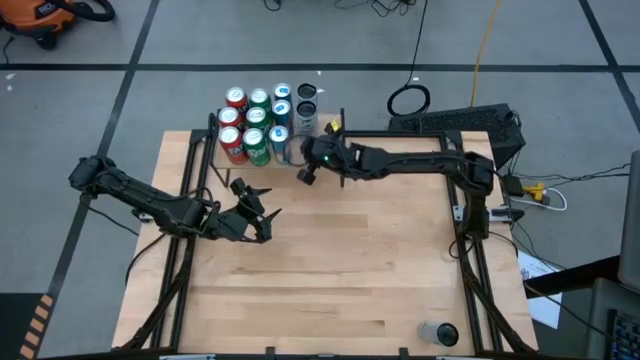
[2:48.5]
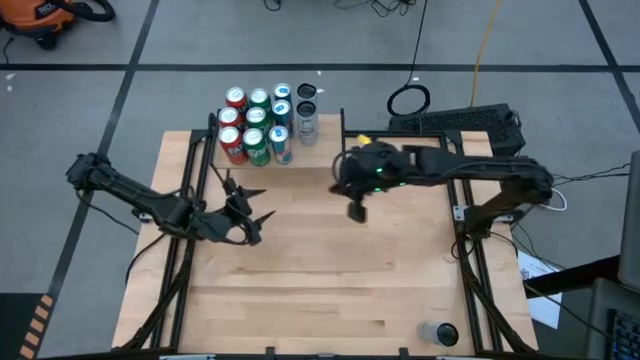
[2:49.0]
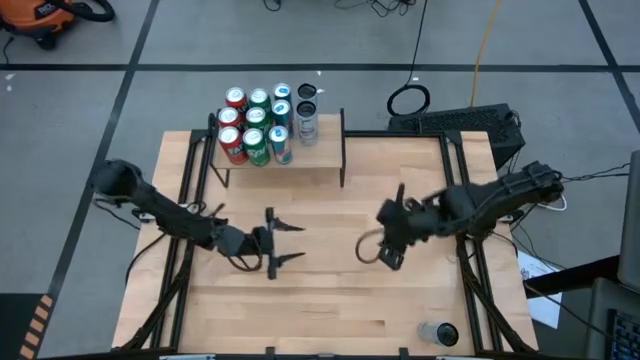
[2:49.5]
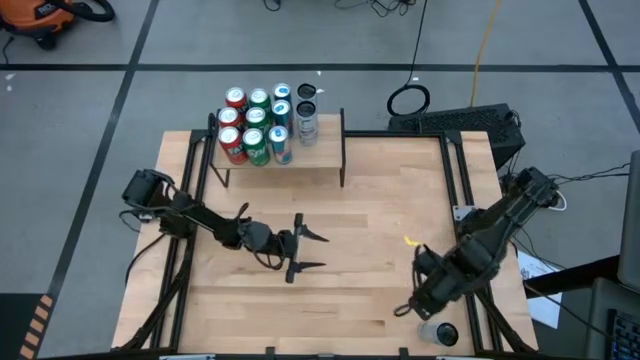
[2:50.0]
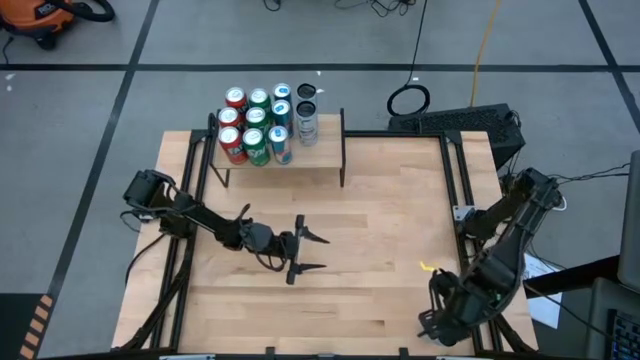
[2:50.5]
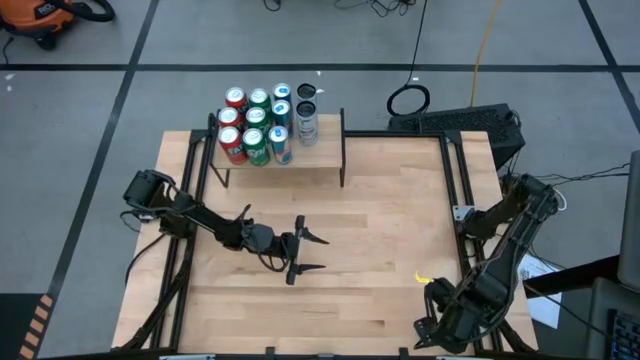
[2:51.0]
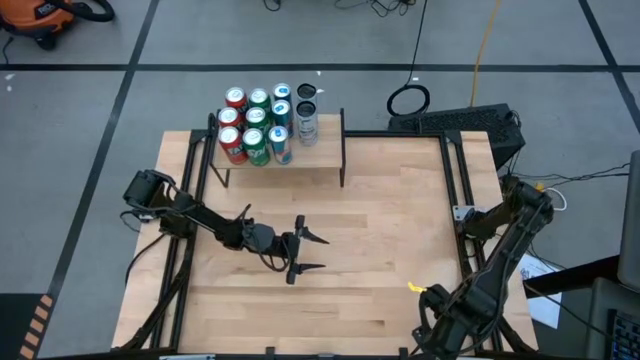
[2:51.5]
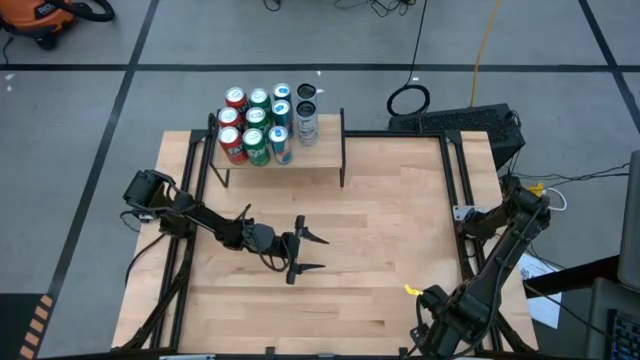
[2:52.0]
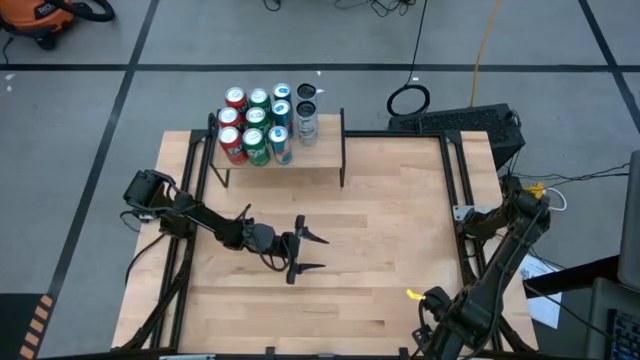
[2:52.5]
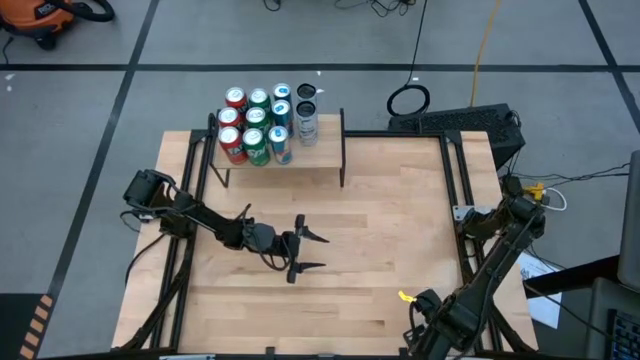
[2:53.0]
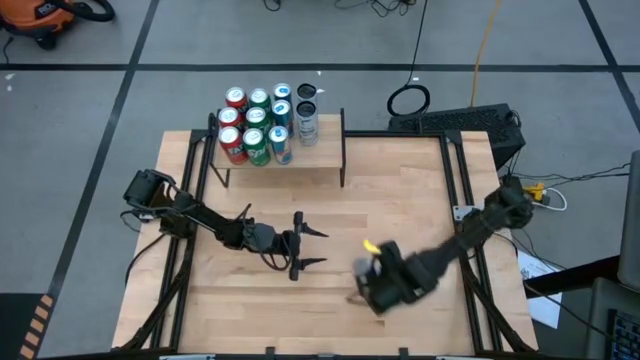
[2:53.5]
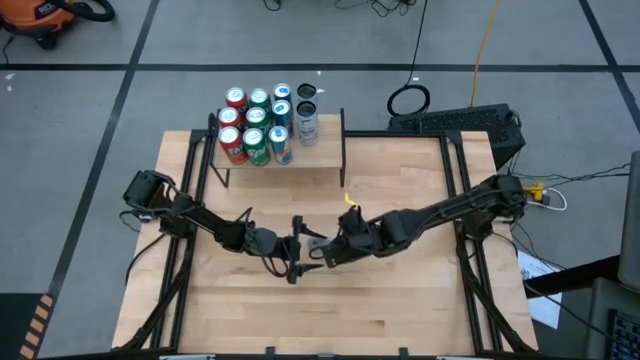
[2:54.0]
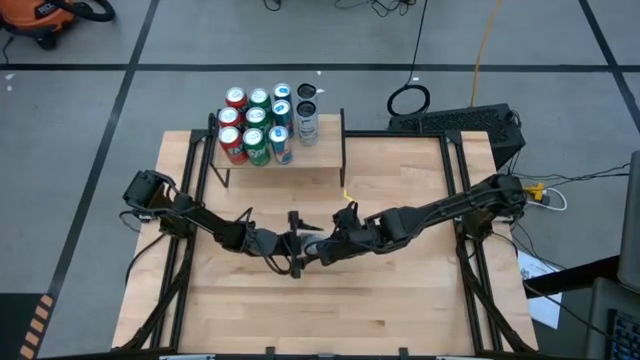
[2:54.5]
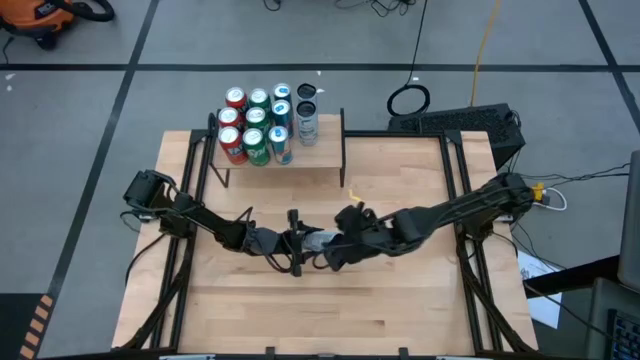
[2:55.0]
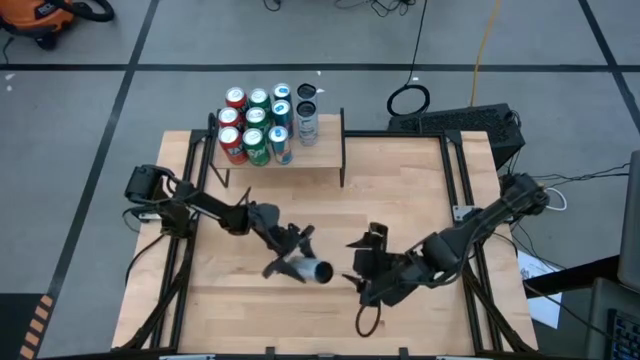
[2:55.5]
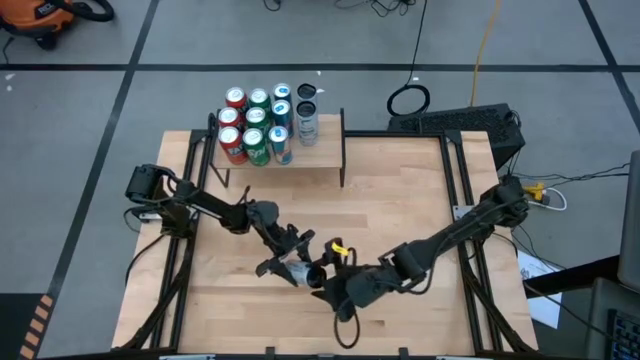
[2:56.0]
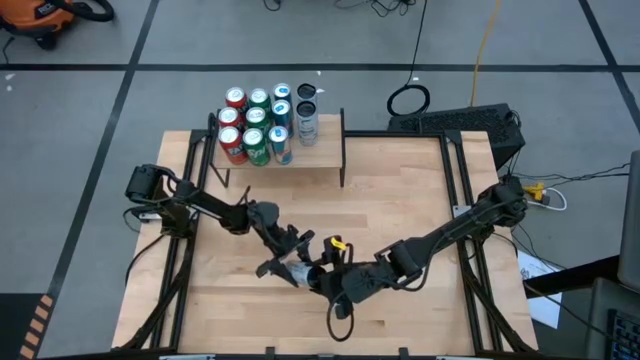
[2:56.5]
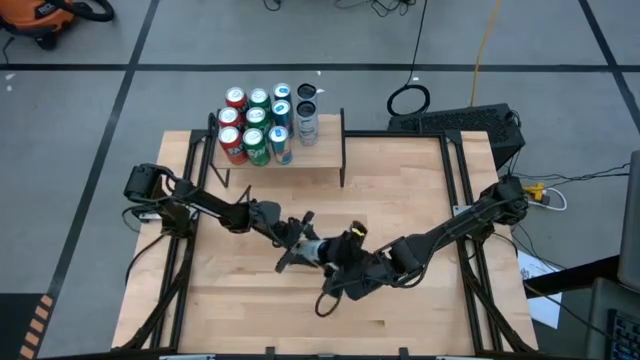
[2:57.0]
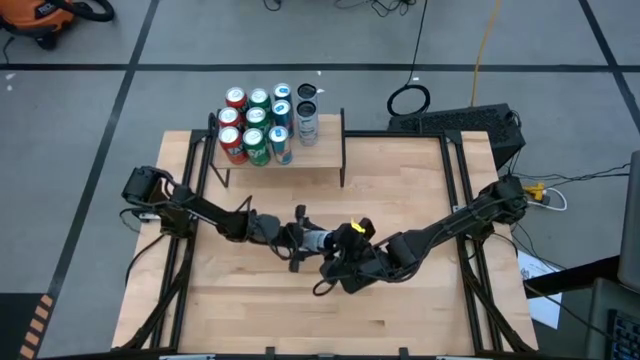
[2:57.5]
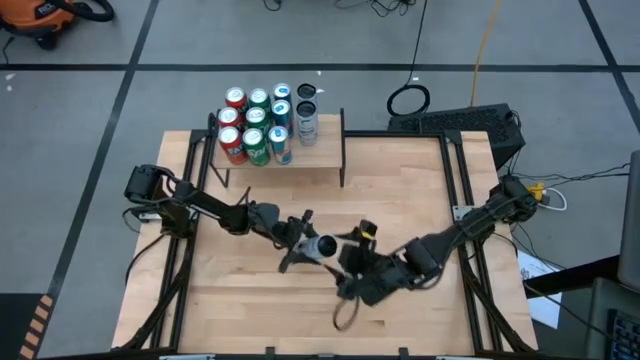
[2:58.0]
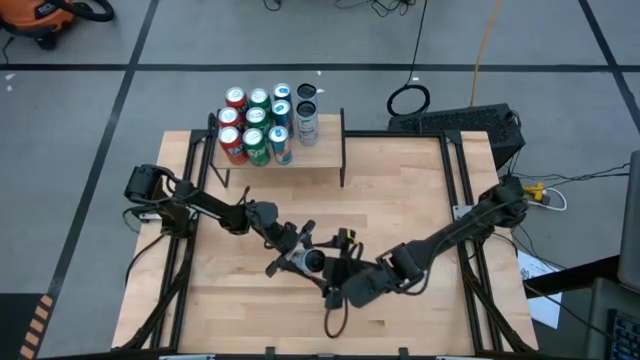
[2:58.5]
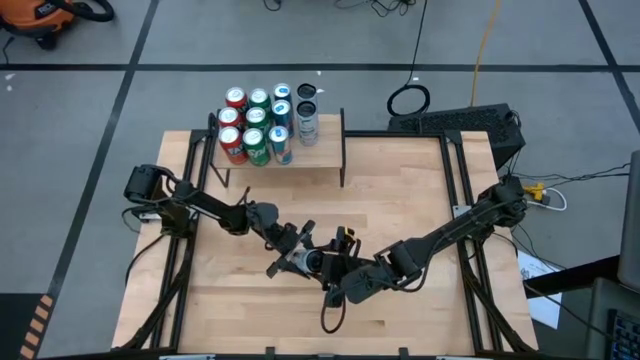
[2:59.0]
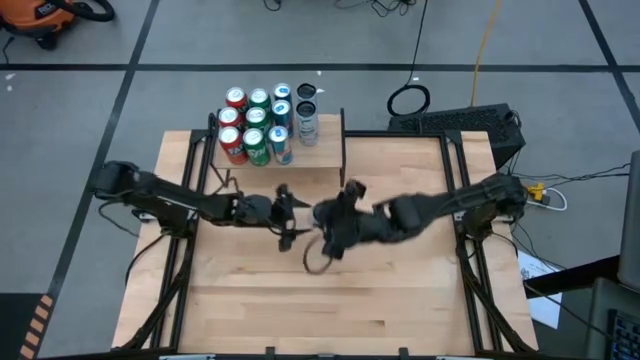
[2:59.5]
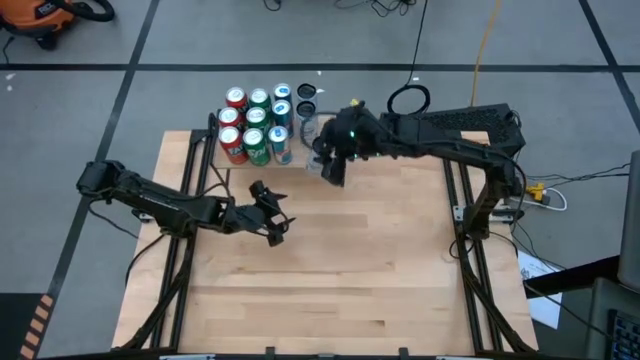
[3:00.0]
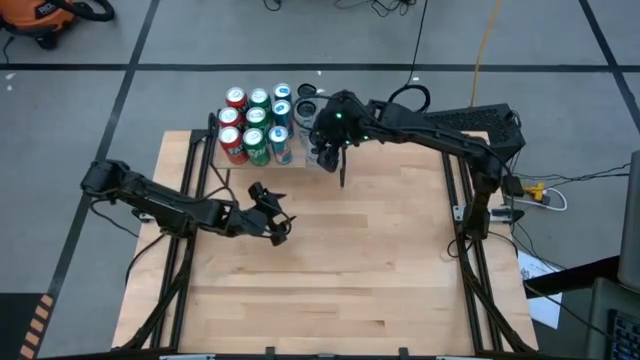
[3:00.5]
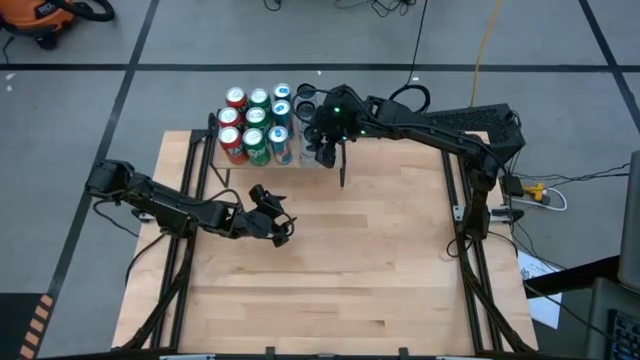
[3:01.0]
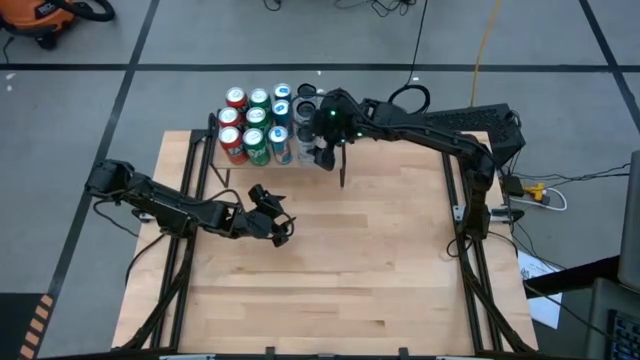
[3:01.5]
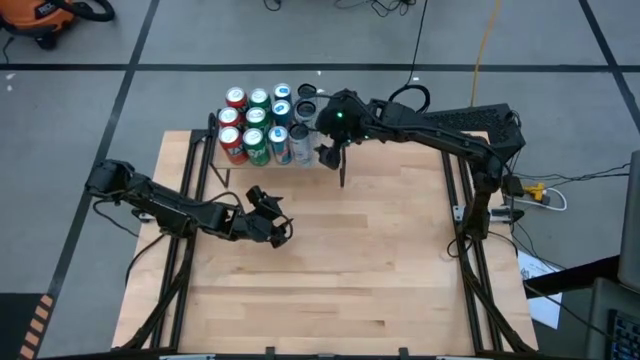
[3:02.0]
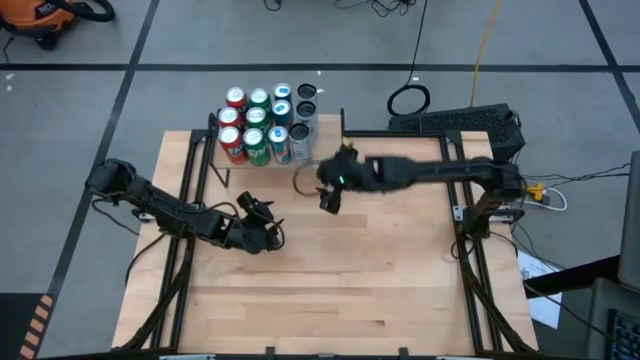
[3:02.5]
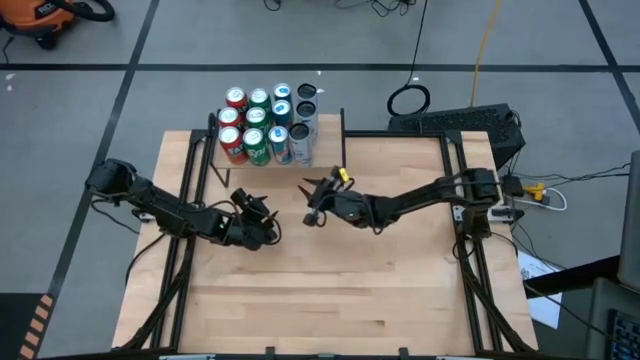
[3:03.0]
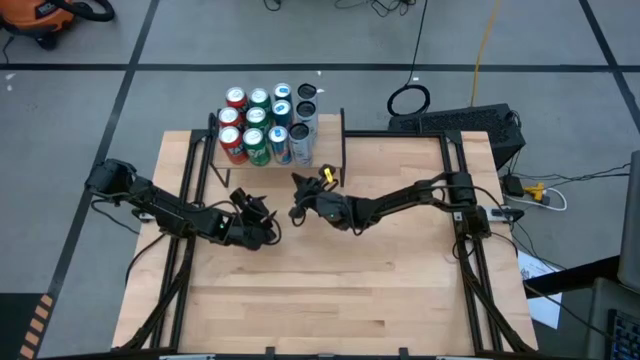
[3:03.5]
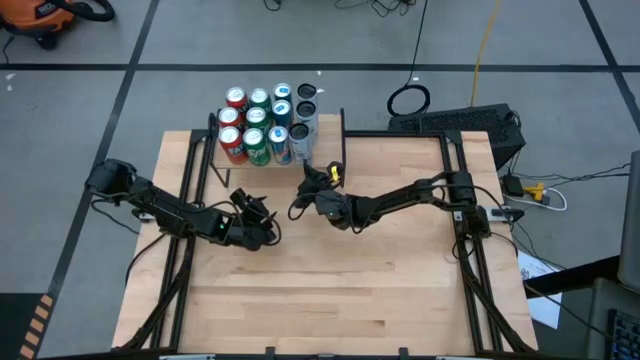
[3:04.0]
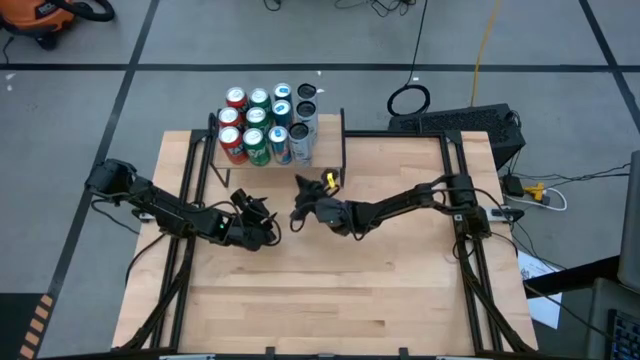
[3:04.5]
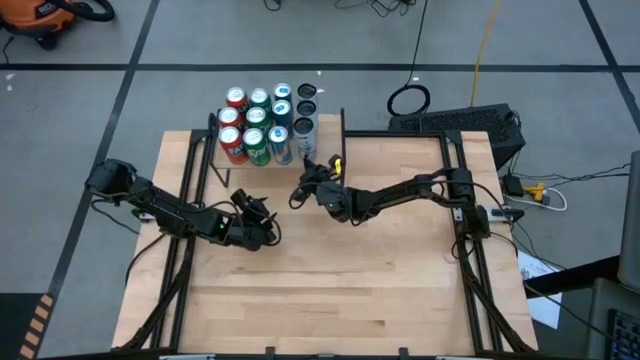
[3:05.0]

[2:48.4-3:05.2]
Task: Place canned beverage on shelf
Put the black soda can on the shelf

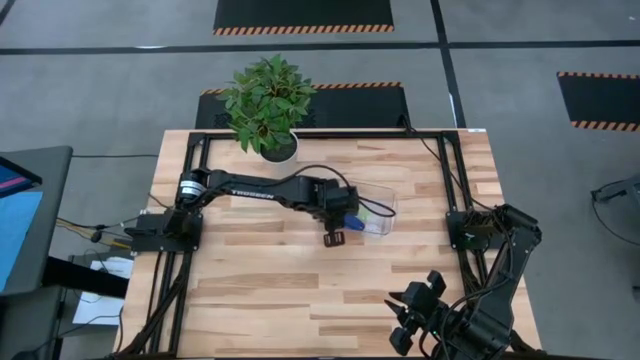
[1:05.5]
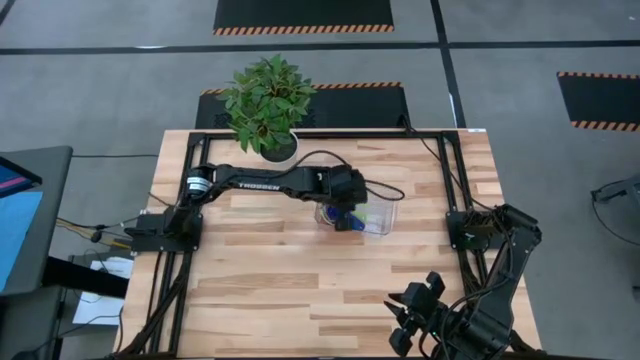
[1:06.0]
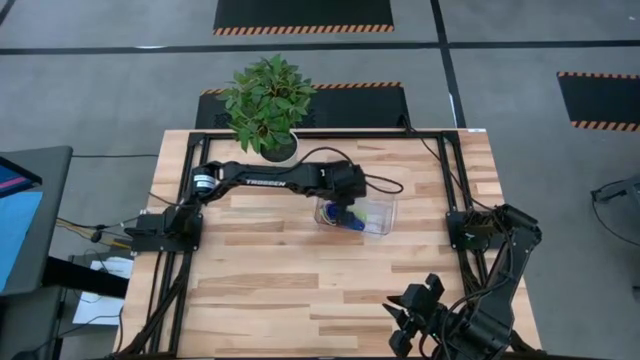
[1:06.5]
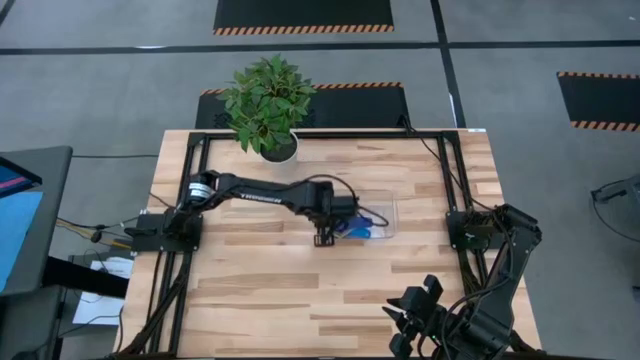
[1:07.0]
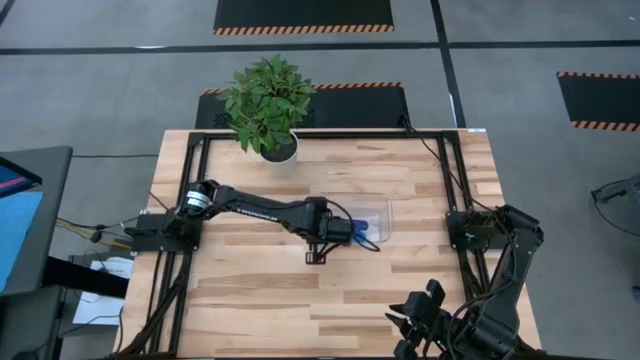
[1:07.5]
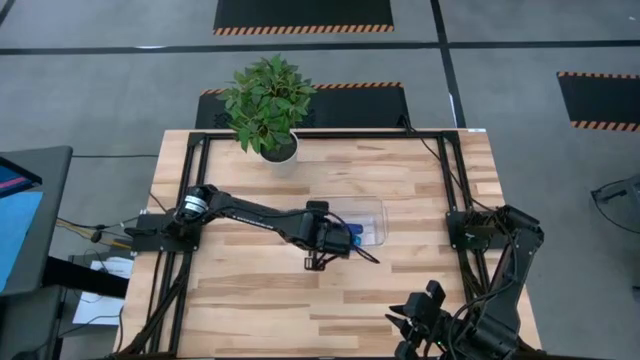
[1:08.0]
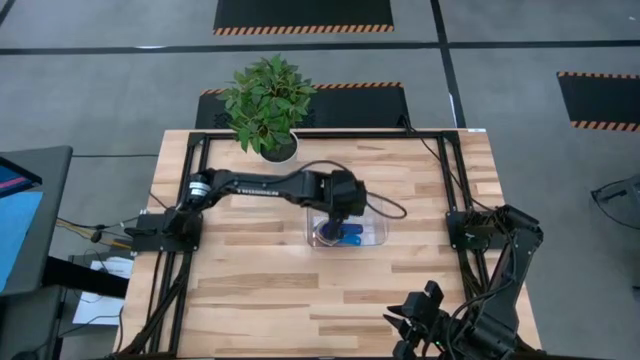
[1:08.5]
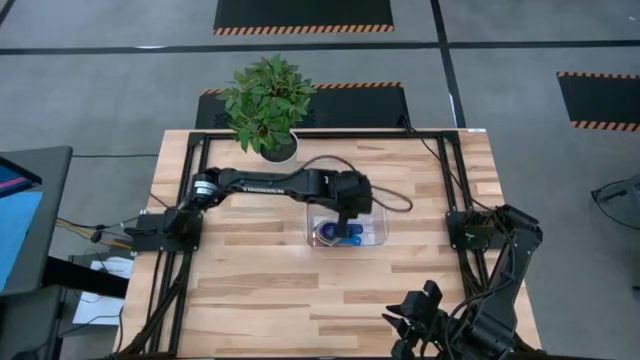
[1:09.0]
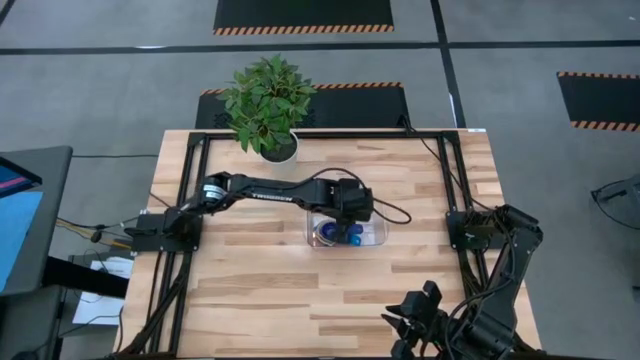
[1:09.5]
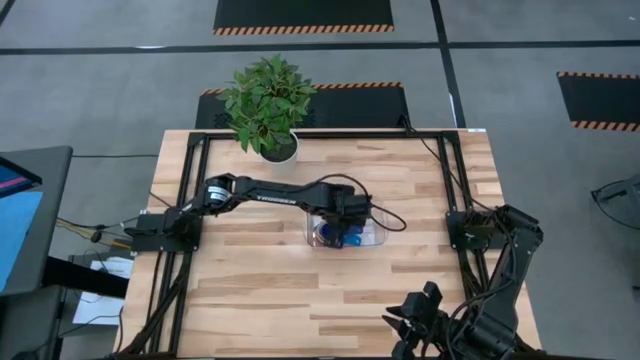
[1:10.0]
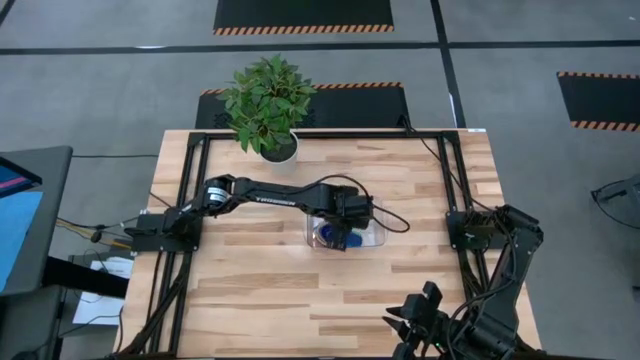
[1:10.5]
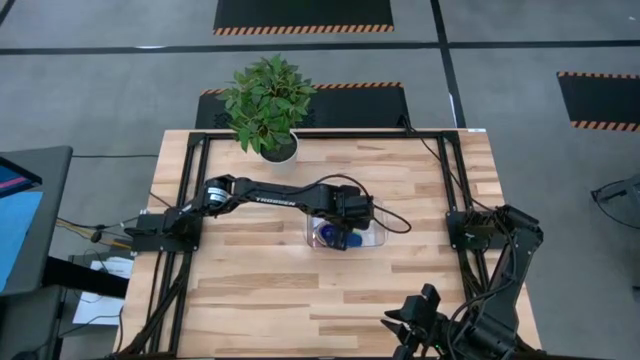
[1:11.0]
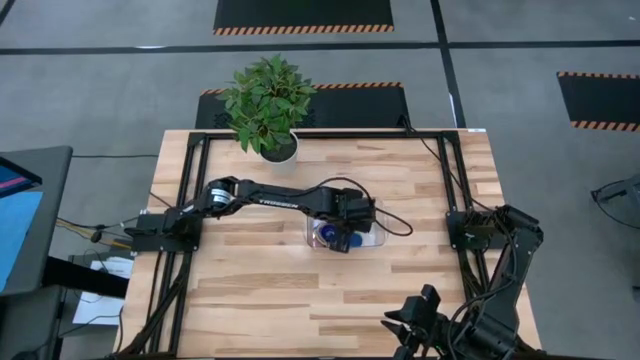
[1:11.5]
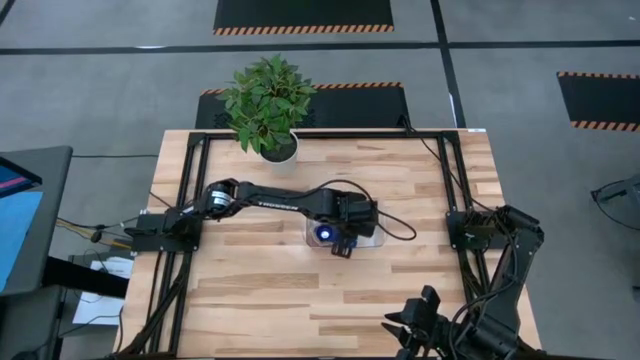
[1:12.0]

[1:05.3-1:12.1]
Task: Nest measuring cups in basket
Adjust the nested colored measuring cups
